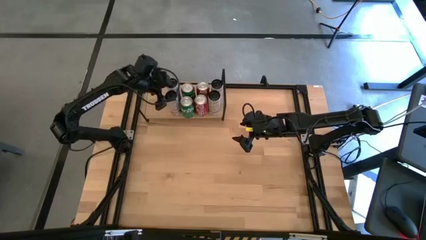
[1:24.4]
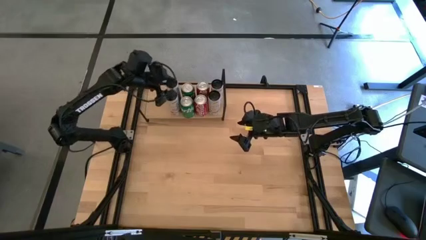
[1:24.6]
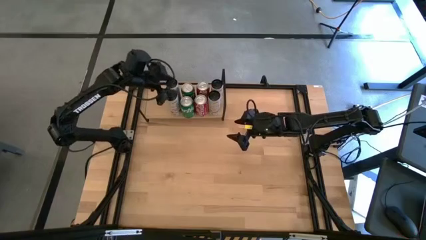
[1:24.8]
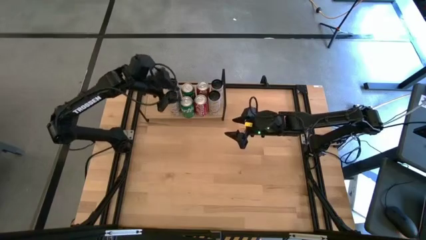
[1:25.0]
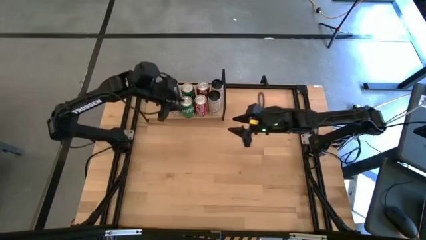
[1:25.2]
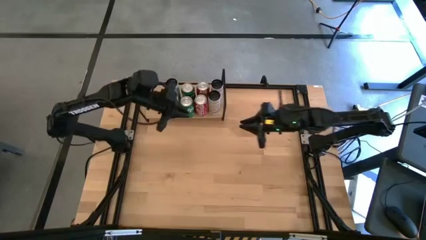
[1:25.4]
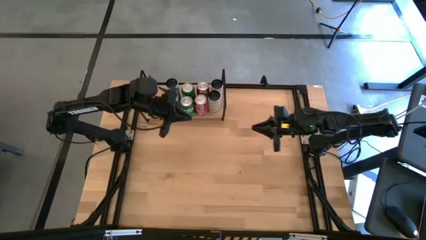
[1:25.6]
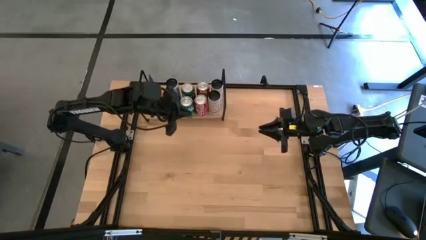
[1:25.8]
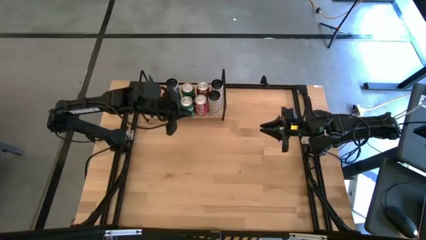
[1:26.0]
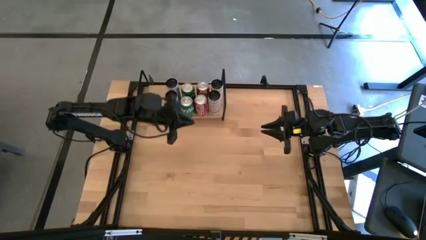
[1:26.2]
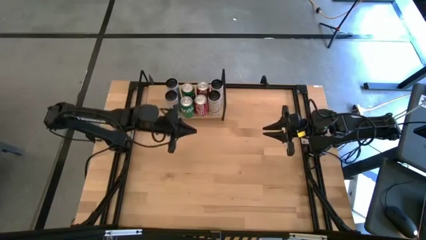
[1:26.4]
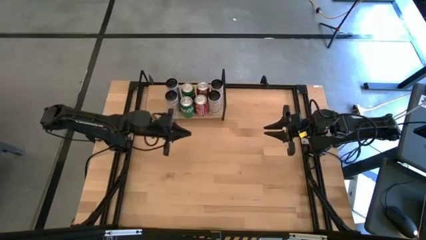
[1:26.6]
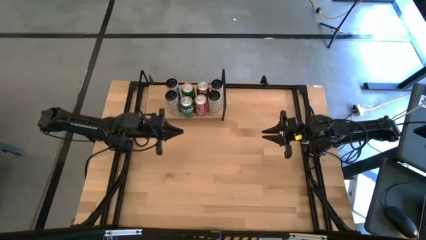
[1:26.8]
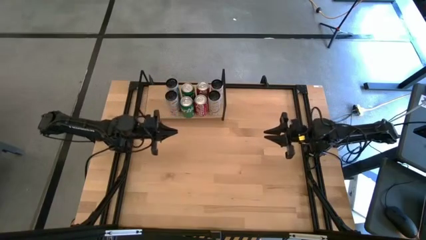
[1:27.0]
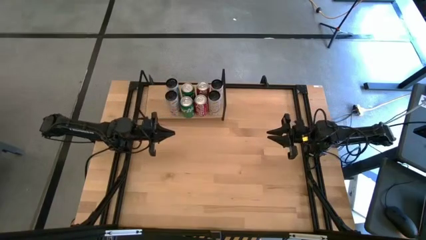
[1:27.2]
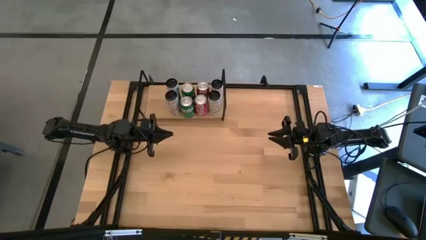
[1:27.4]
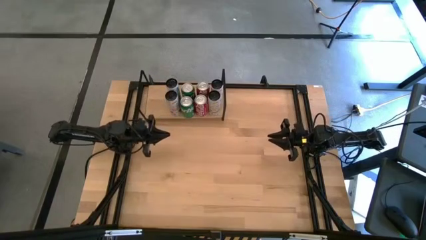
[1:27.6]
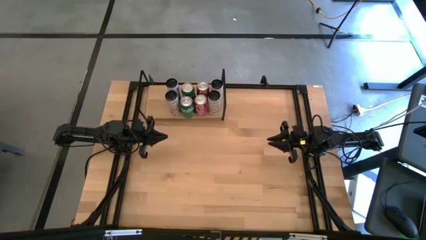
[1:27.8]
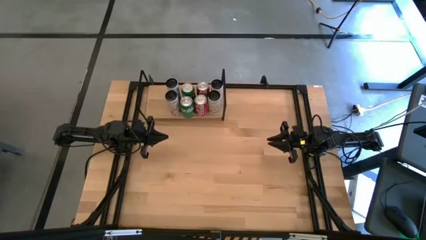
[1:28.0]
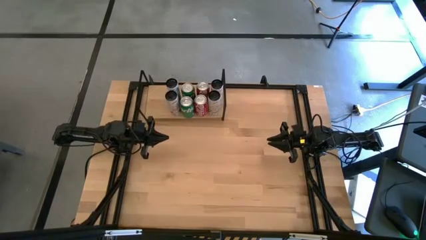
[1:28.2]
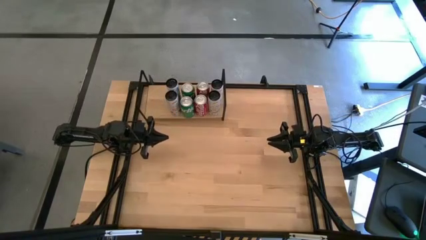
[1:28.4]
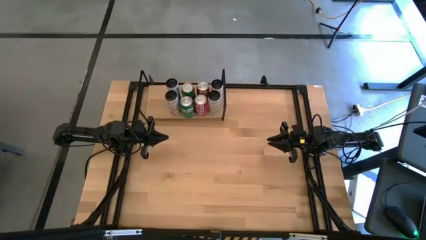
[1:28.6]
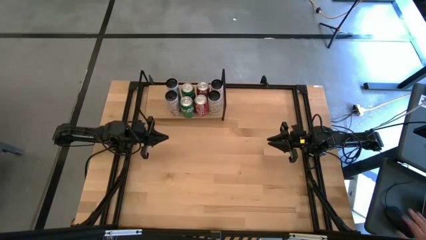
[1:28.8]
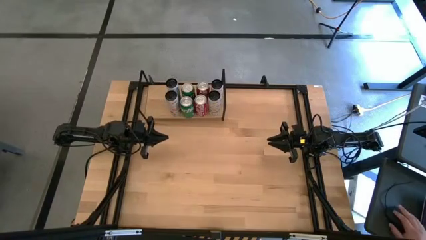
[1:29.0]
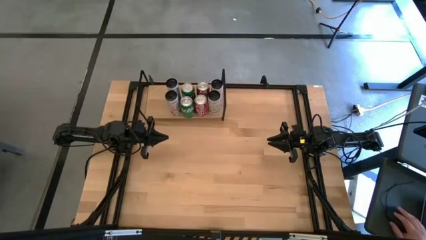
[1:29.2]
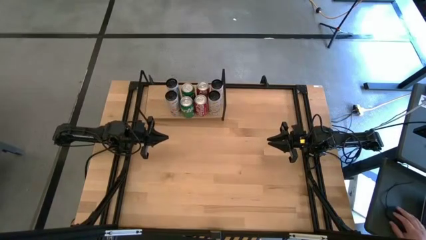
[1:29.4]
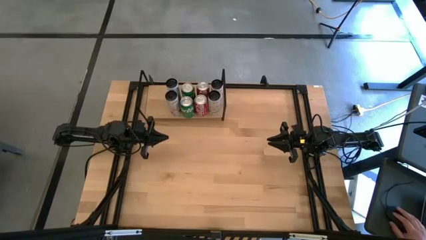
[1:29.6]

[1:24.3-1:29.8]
Task: Place canned beverage on shelf
Return to Home Position

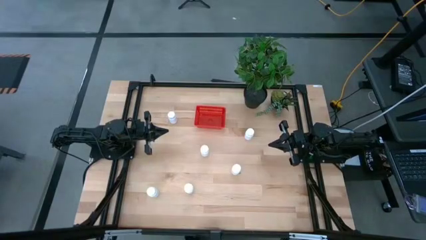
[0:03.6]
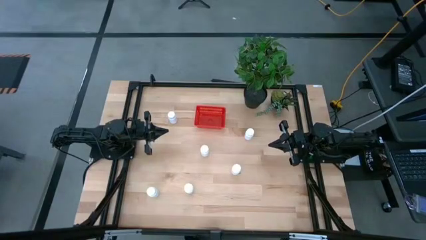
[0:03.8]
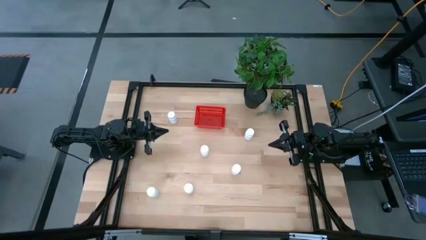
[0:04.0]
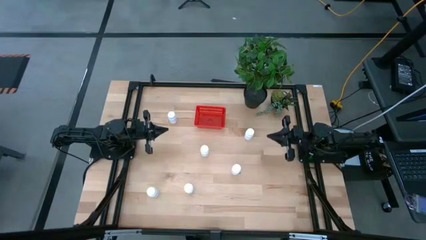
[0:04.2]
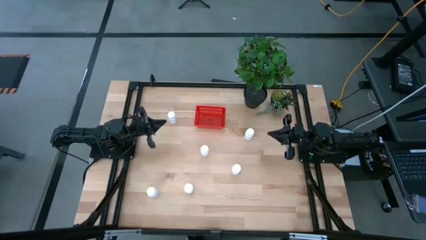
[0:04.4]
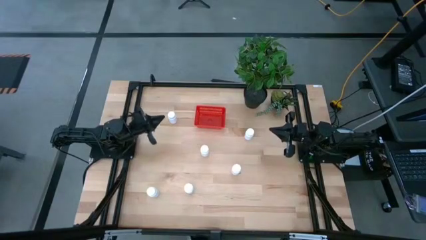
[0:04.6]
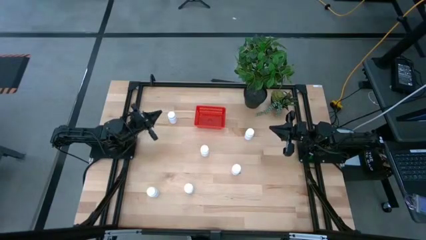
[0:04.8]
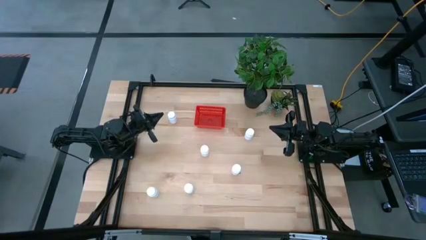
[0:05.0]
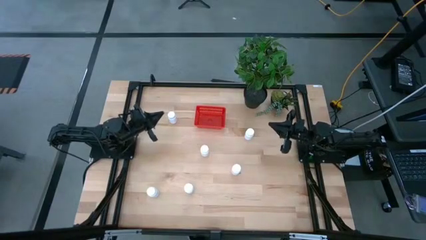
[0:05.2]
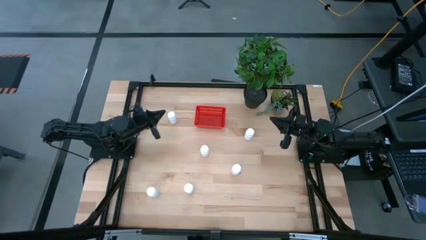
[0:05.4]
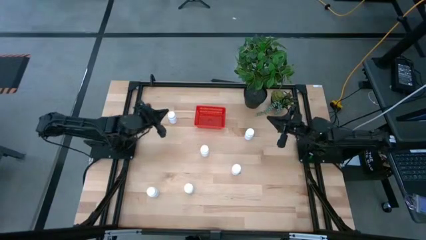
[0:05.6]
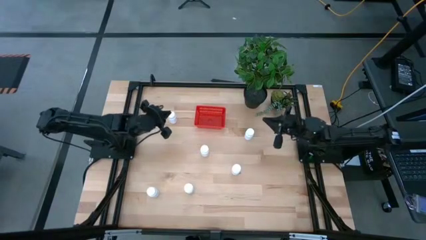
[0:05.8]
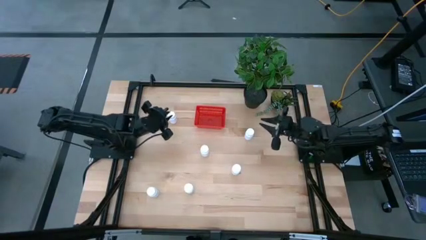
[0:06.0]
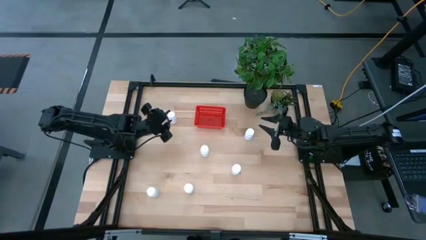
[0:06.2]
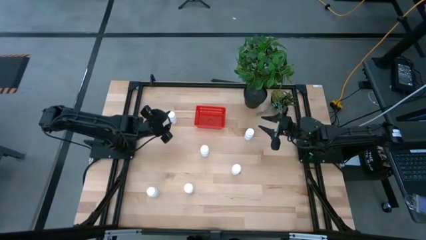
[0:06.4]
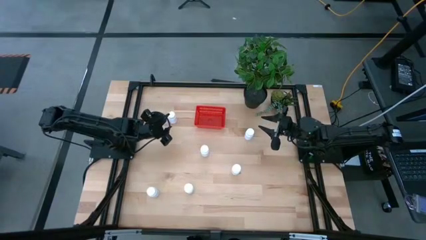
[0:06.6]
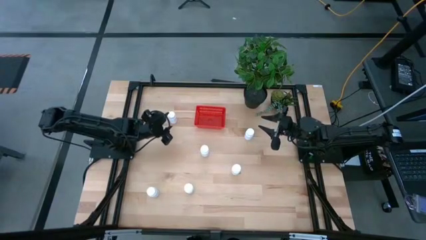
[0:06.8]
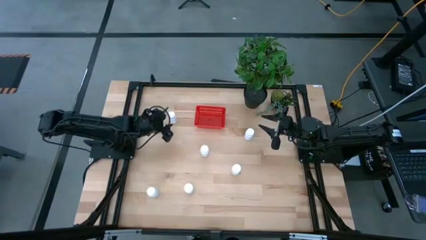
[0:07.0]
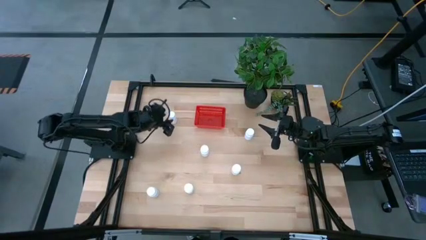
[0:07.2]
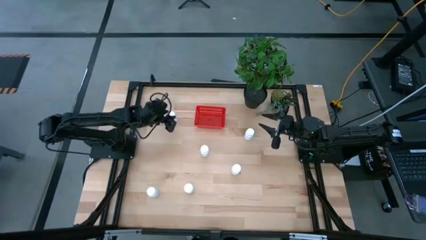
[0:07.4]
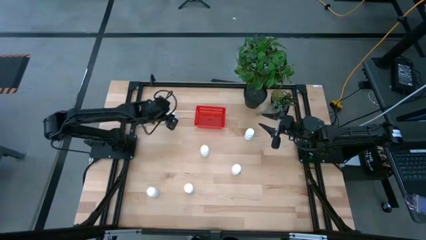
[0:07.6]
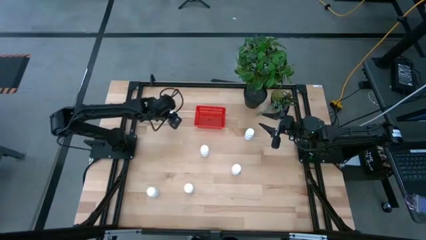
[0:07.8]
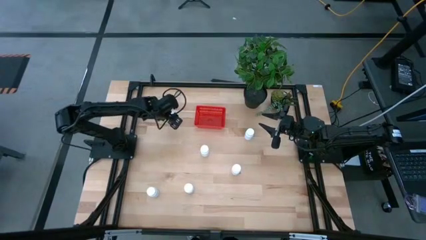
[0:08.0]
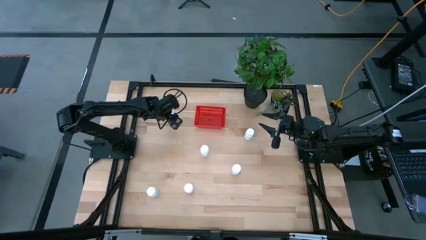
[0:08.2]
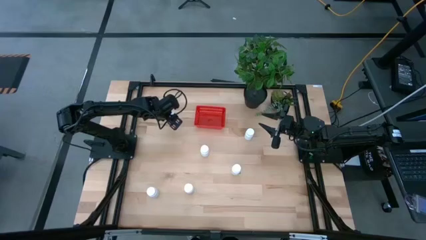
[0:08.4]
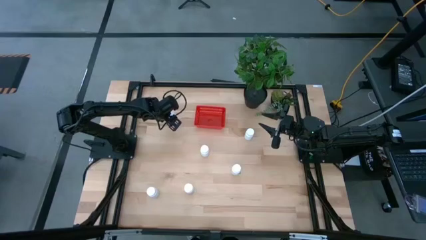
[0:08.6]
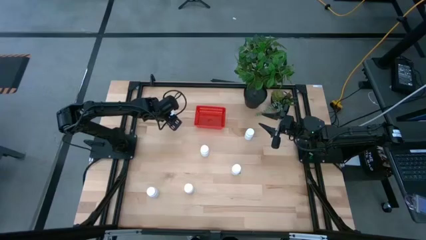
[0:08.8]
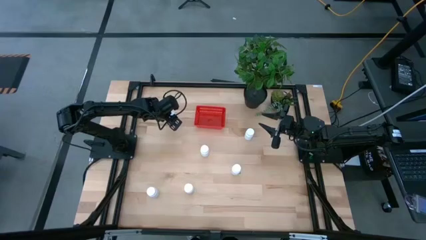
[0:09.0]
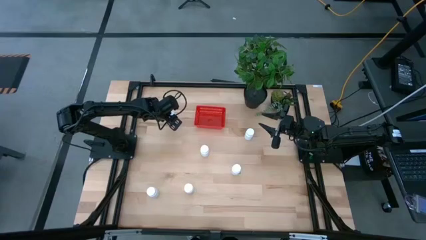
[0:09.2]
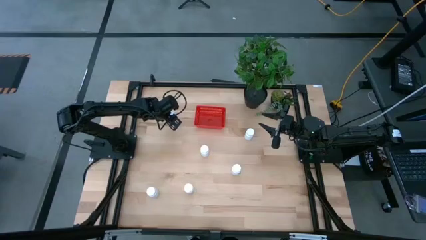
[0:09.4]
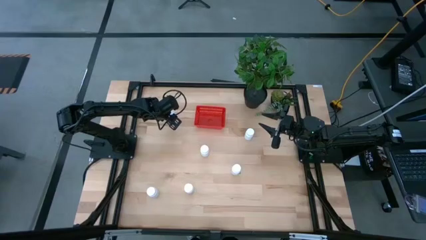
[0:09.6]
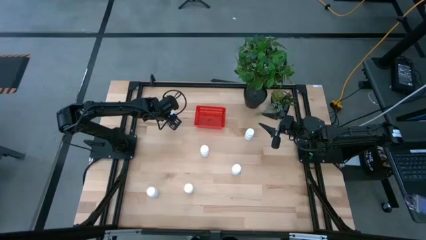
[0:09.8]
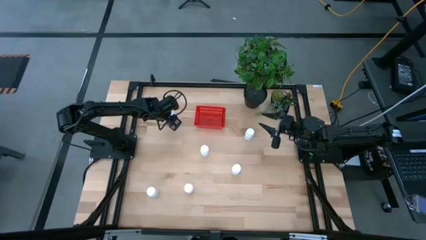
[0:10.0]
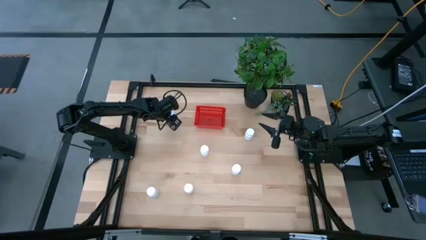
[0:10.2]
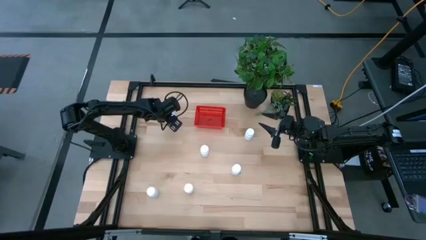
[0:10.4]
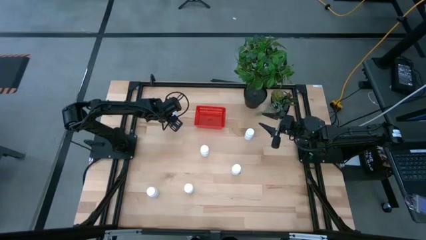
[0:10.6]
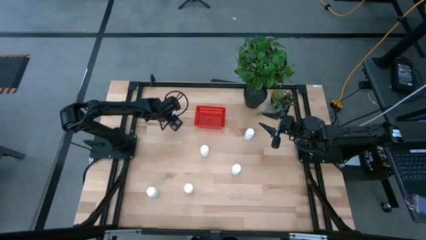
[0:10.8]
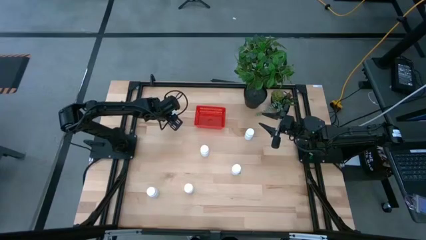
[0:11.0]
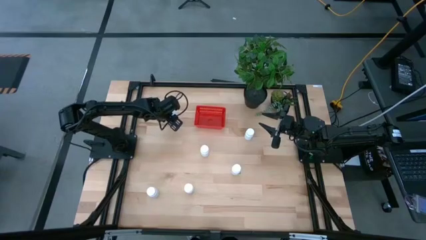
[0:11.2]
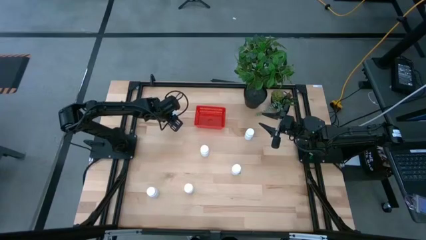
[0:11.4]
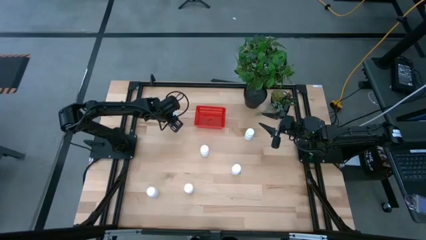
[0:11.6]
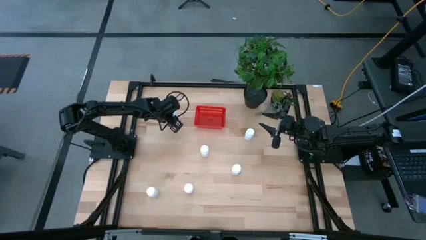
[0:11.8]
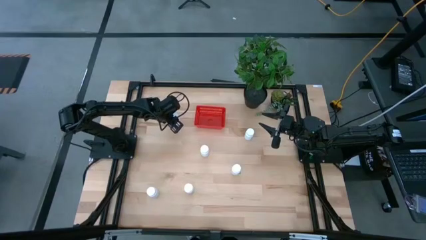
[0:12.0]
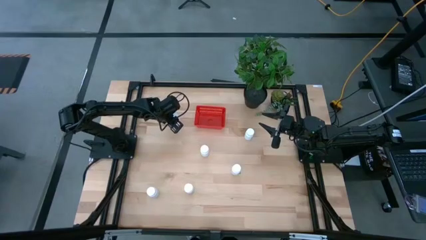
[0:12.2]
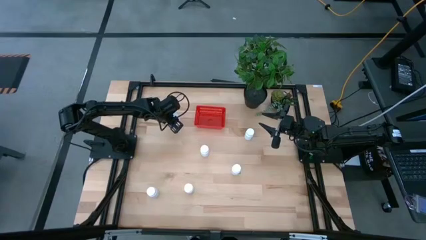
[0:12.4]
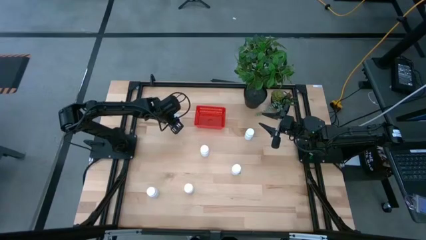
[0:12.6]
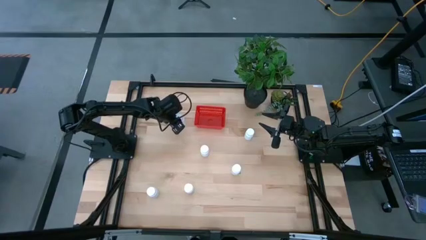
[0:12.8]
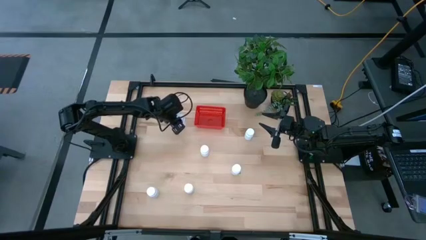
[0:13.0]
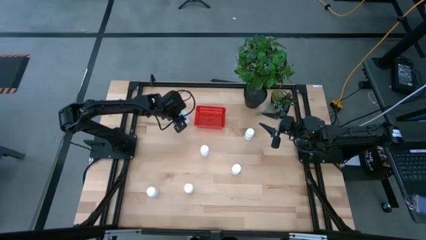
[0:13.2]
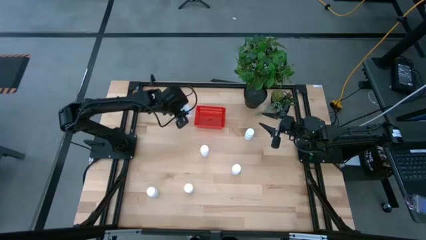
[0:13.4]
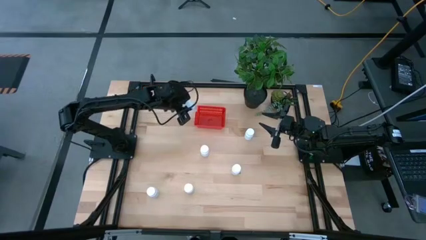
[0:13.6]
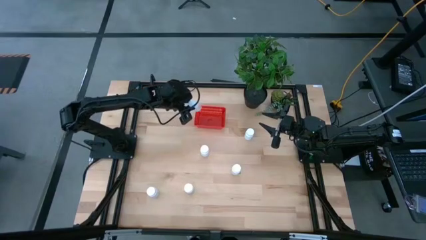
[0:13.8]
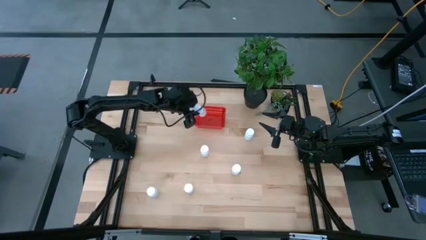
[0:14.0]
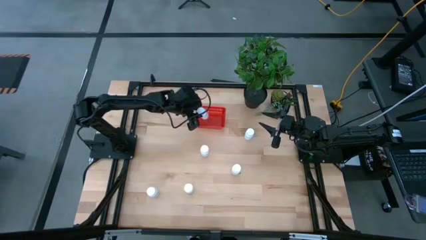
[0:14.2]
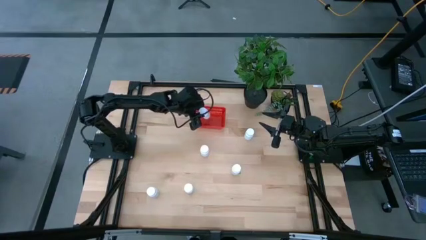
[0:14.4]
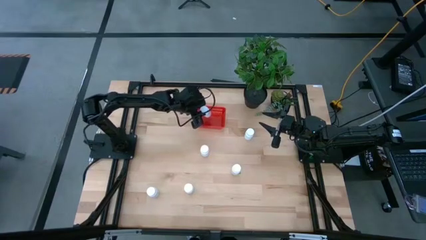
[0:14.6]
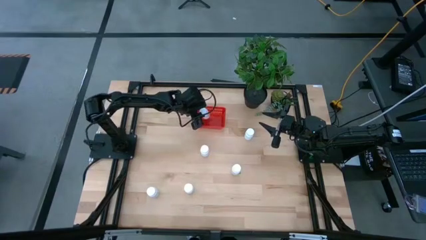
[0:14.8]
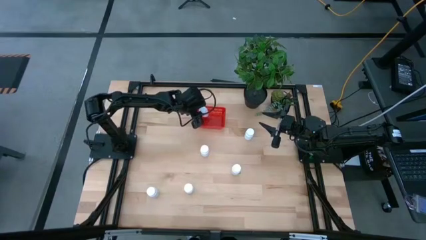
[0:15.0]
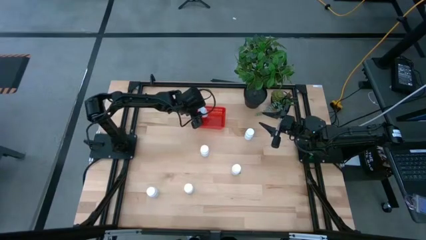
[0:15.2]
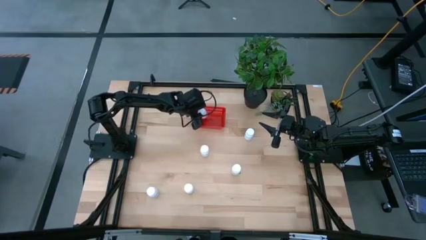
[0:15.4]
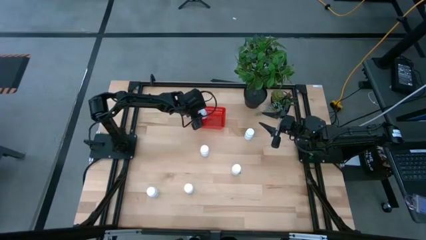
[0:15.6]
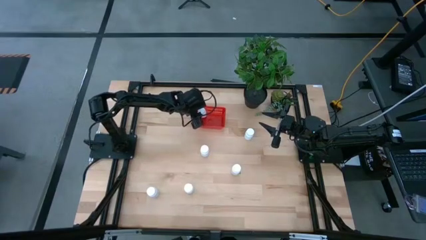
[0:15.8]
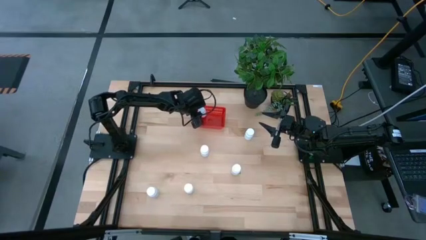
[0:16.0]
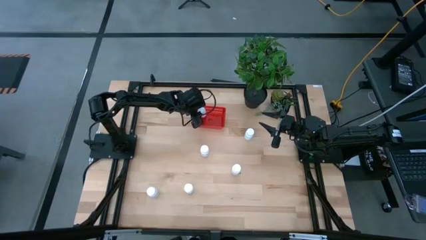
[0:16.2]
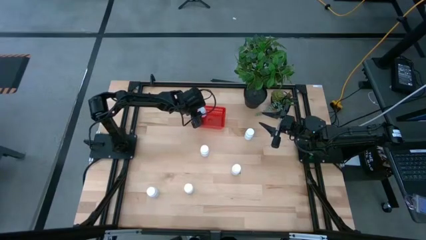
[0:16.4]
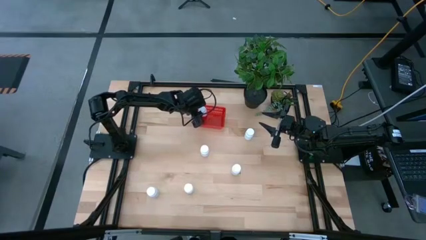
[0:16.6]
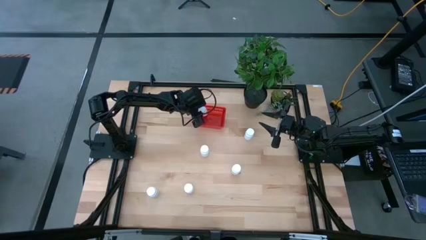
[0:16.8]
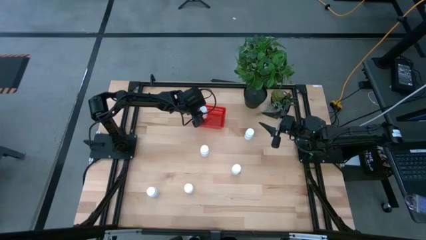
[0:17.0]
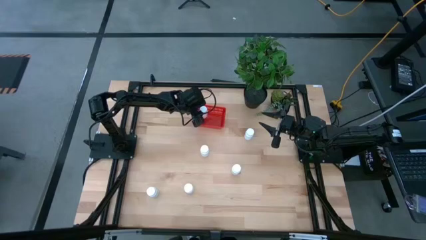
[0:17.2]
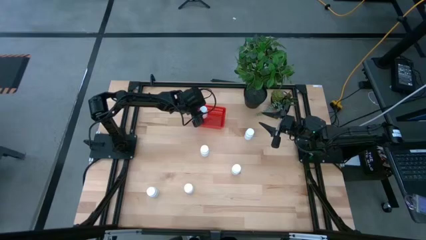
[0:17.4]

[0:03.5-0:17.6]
Task: Pick and place pill bottles into a basket
Put the white pill bottle into the red bin
